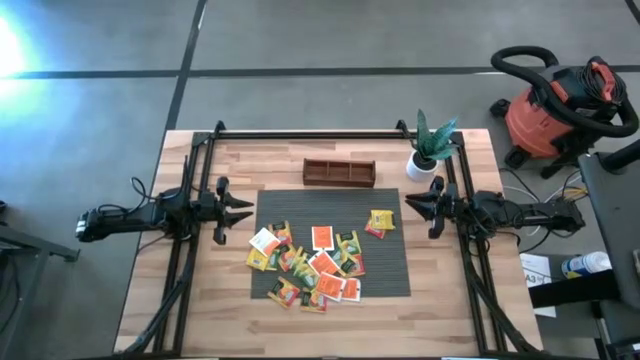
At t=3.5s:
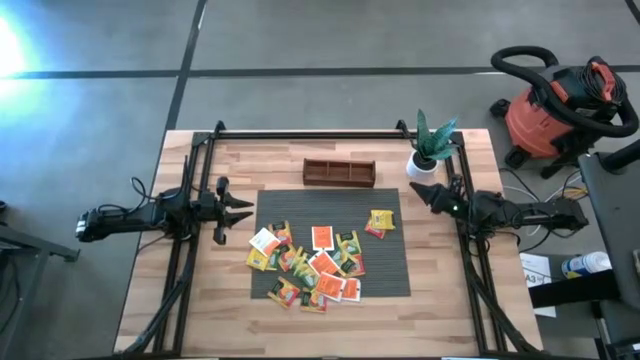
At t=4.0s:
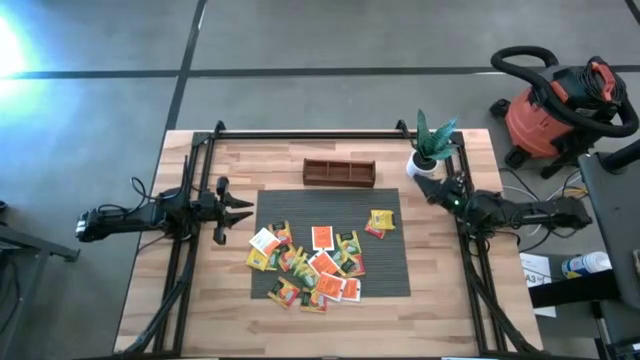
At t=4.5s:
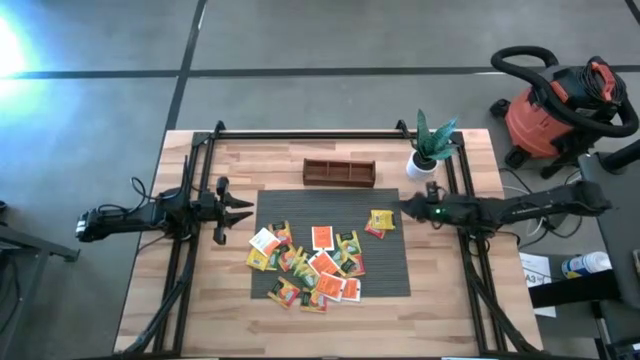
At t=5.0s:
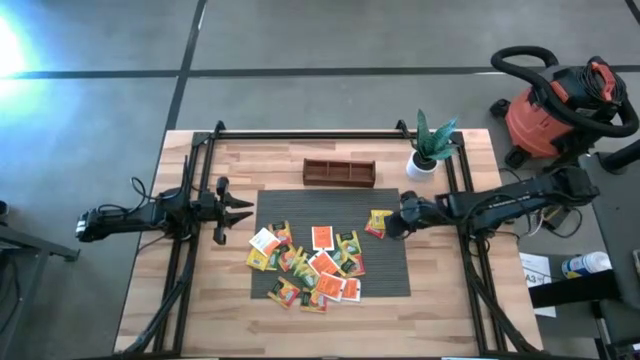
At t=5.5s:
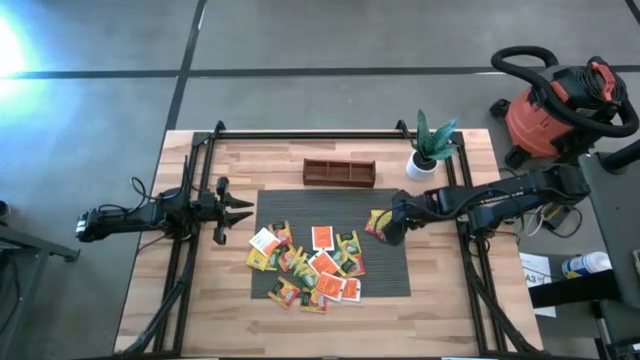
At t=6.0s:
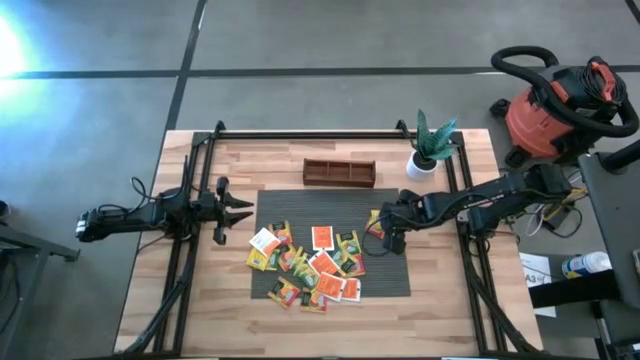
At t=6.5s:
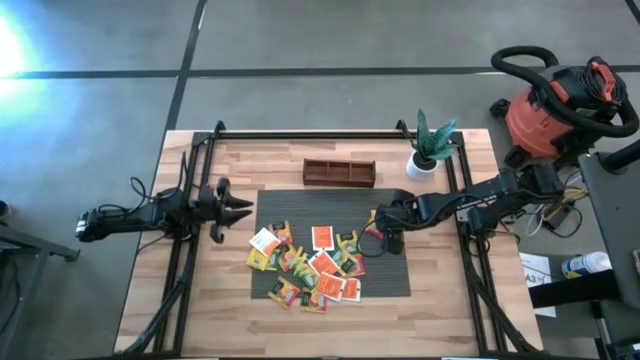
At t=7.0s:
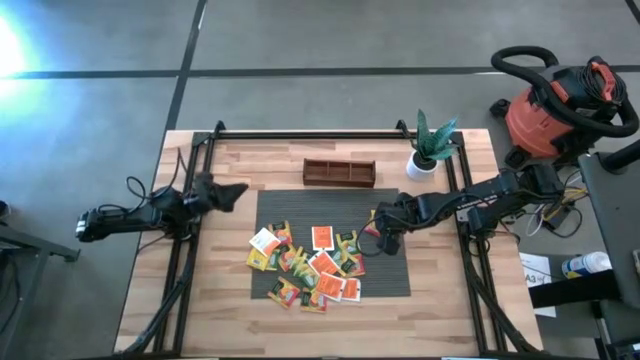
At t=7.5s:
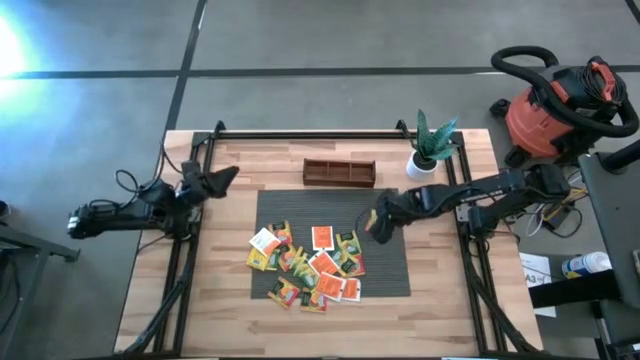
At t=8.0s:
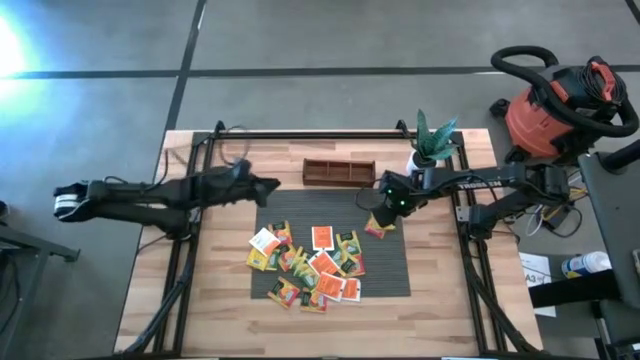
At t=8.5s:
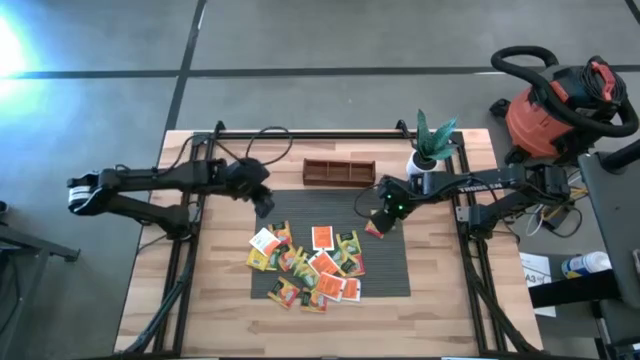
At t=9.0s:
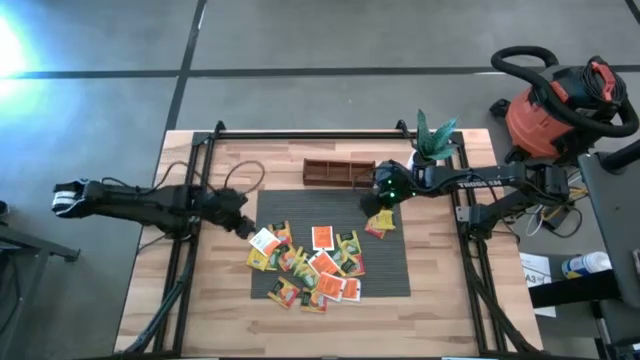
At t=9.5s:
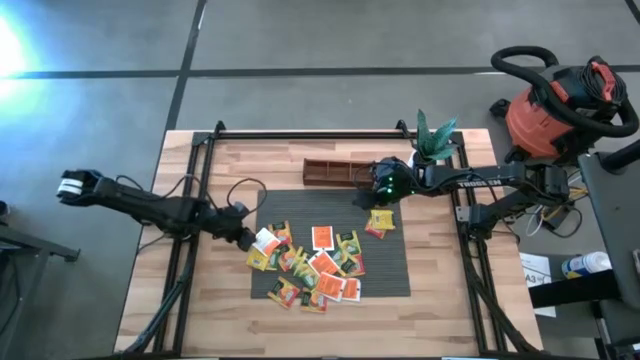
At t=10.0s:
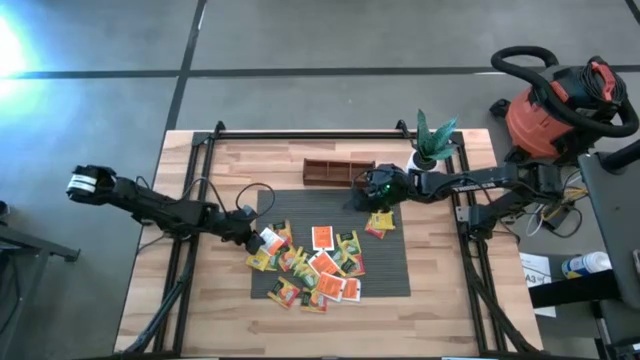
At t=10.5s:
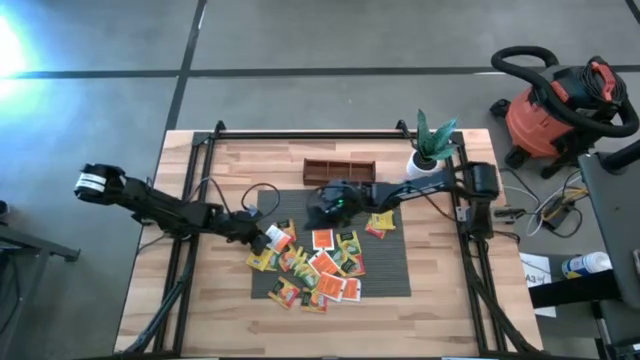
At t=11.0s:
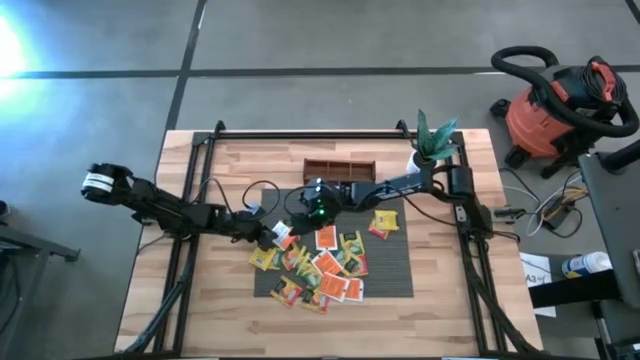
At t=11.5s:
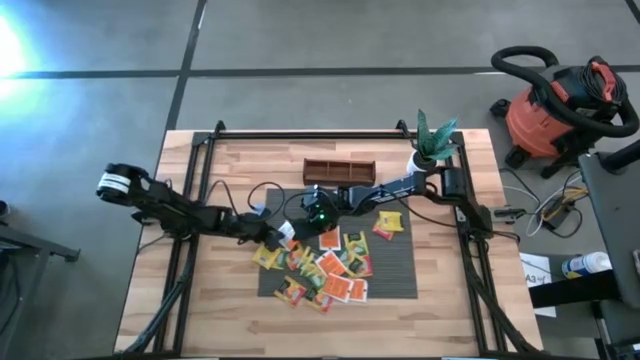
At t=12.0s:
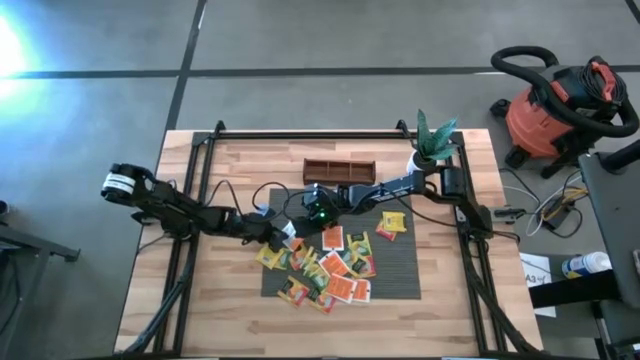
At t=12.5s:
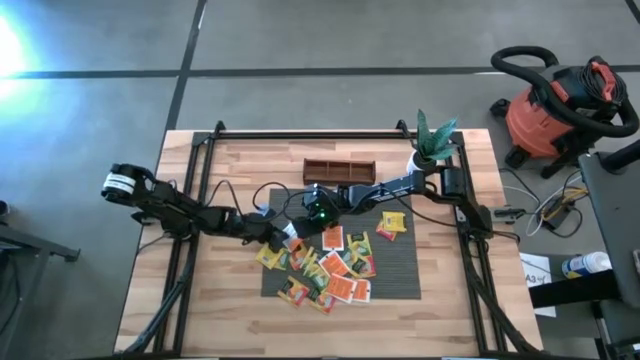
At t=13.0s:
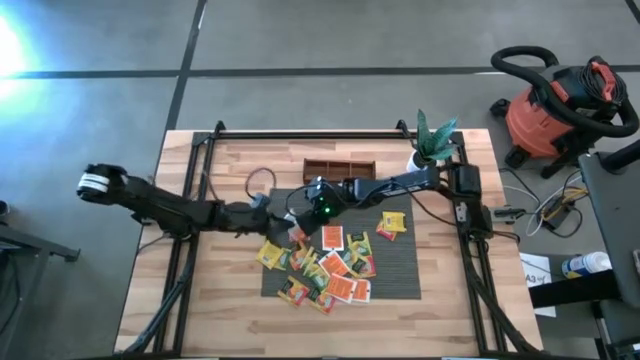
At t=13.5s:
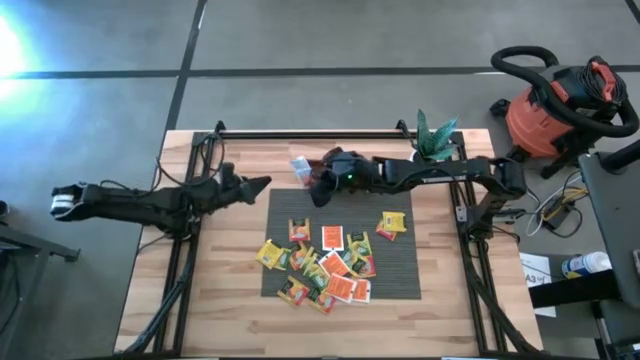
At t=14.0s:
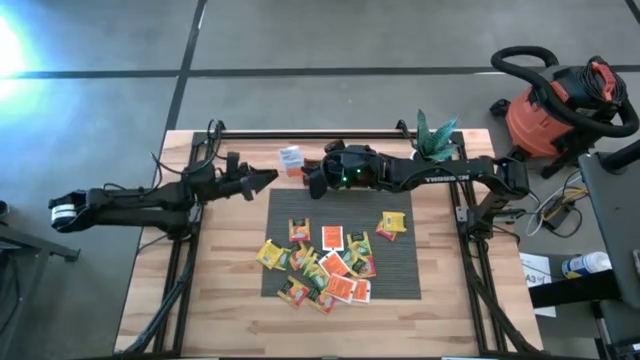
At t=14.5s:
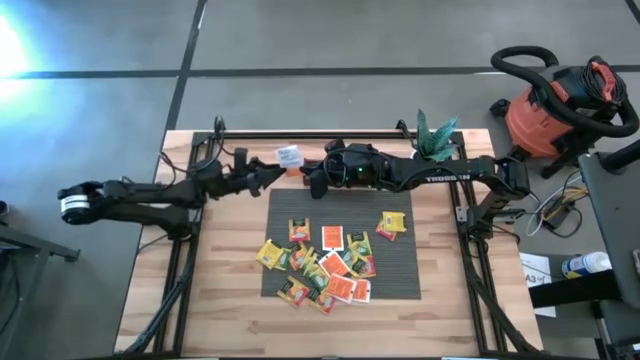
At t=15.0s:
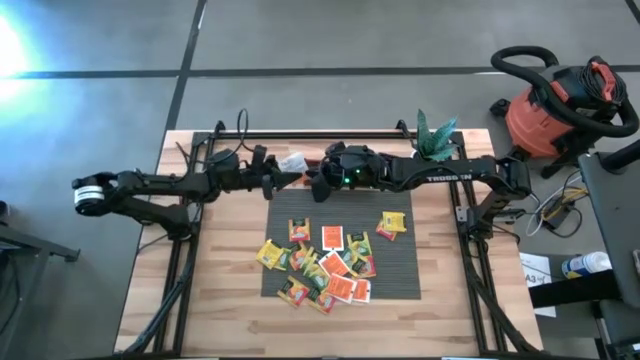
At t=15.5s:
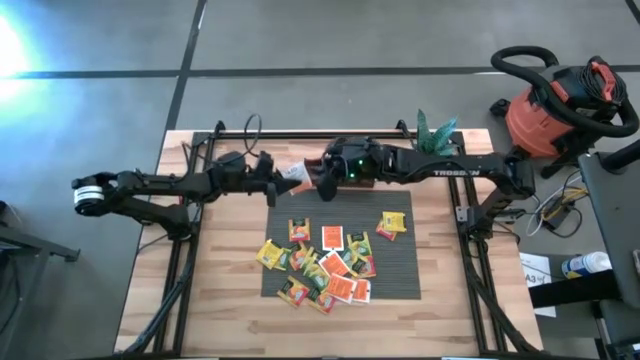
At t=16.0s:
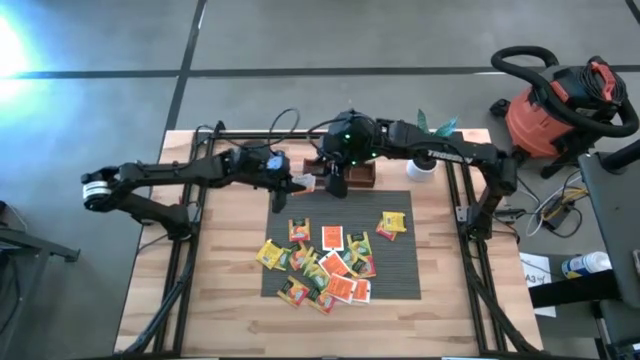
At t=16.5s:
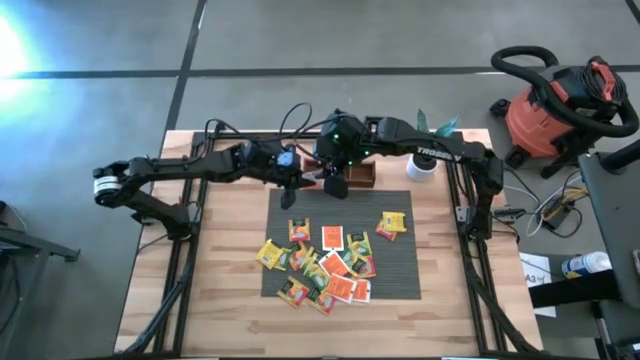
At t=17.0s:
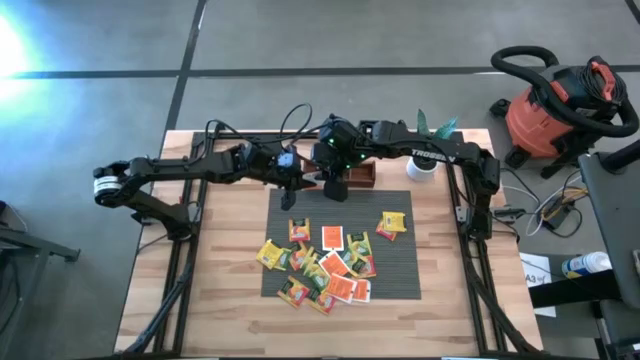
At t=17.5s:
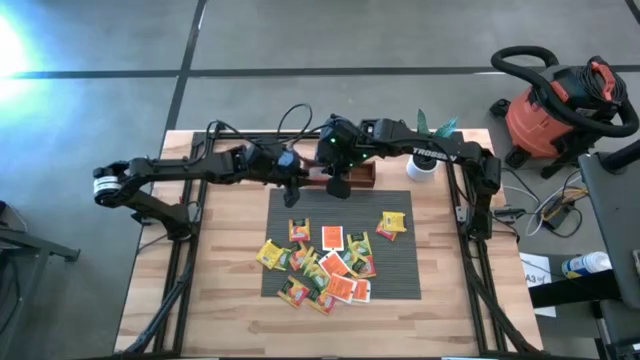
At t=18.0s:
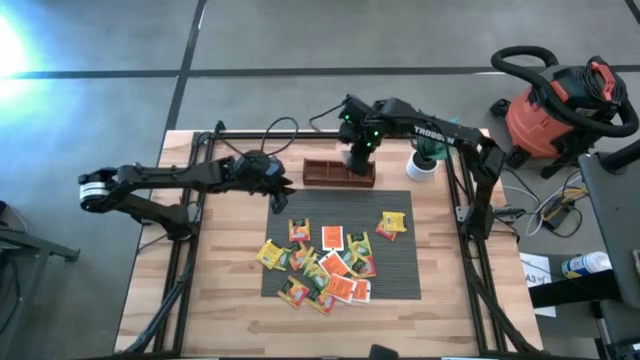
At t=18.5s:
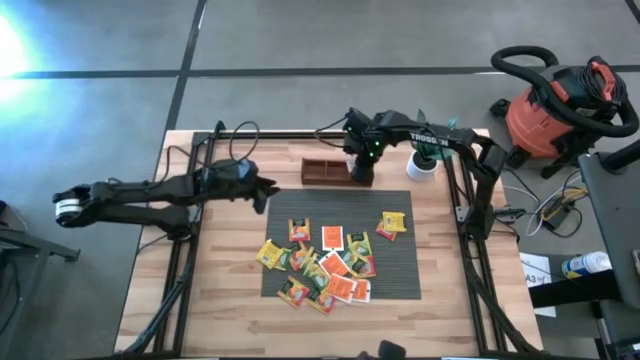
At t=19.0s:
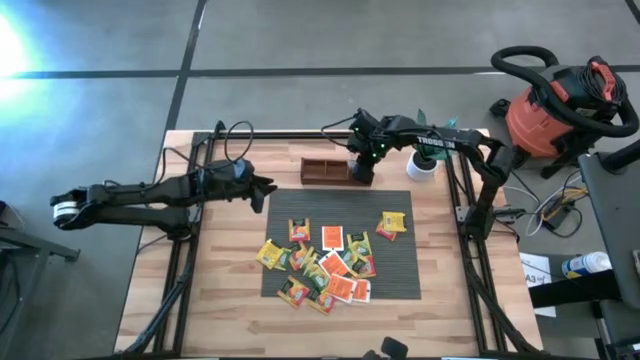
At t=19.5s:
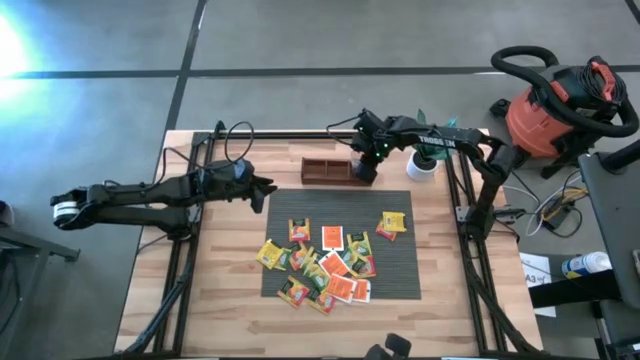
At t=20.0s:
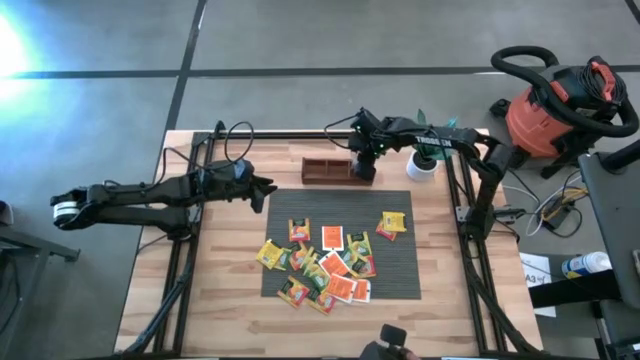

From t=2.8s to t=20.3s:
Task: Pick & Place Tea
Put the white orange tea bag into the right section of the wooden organizer

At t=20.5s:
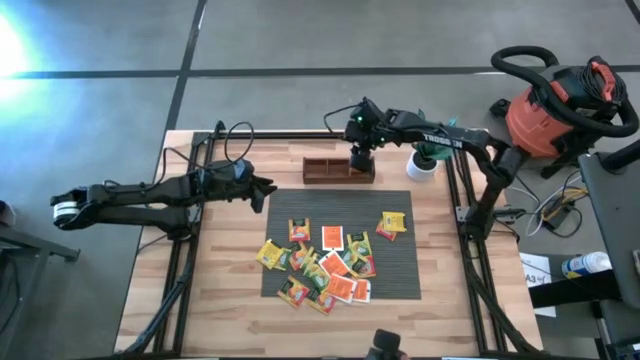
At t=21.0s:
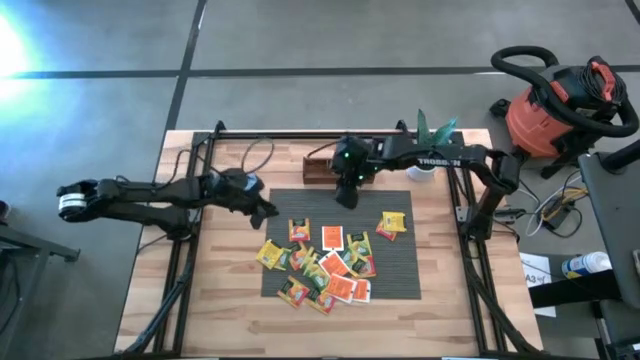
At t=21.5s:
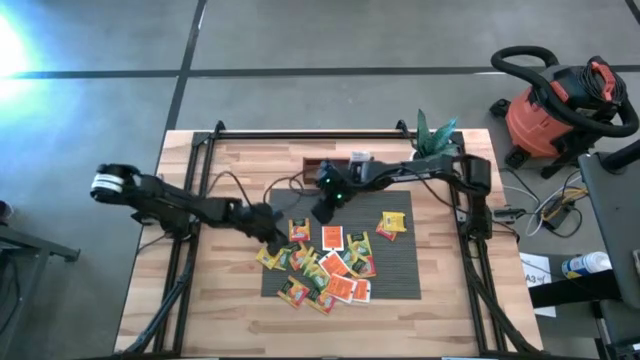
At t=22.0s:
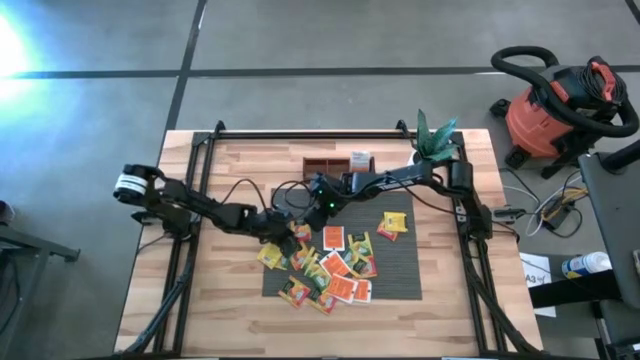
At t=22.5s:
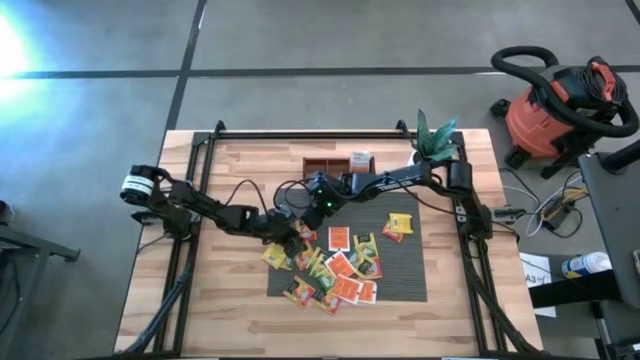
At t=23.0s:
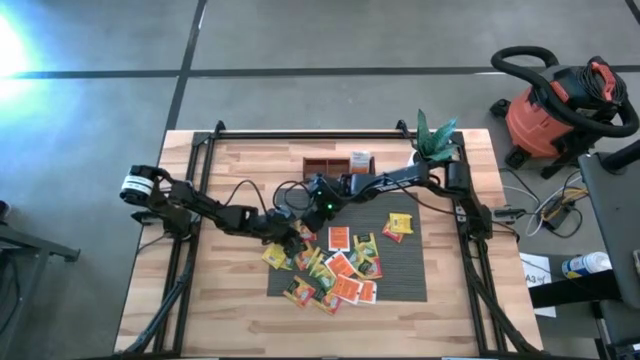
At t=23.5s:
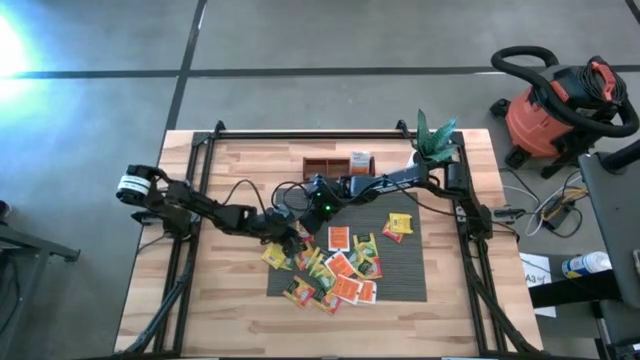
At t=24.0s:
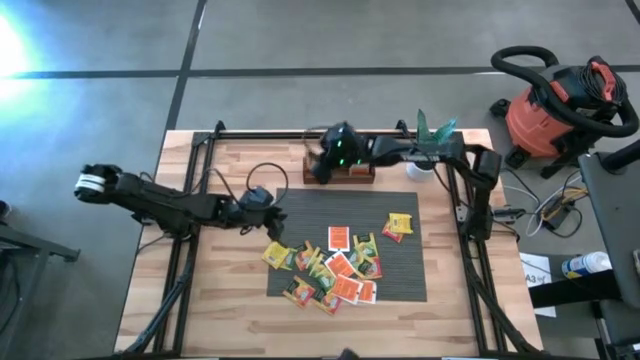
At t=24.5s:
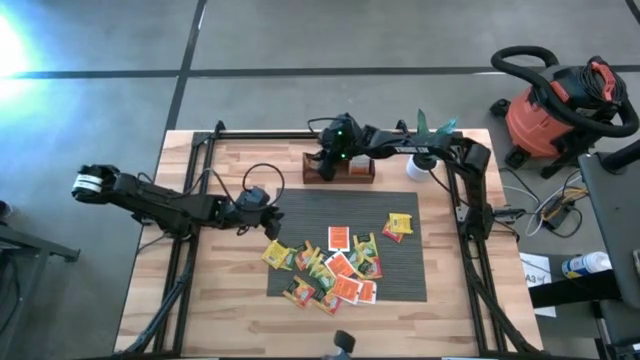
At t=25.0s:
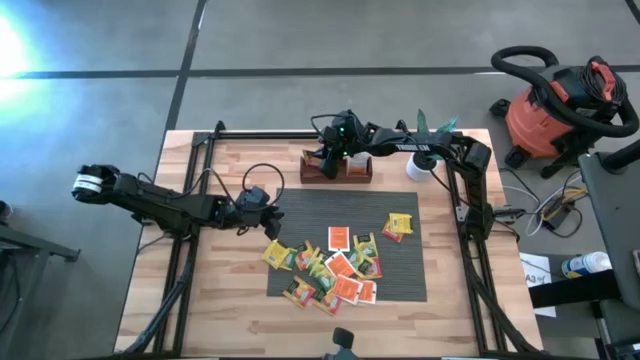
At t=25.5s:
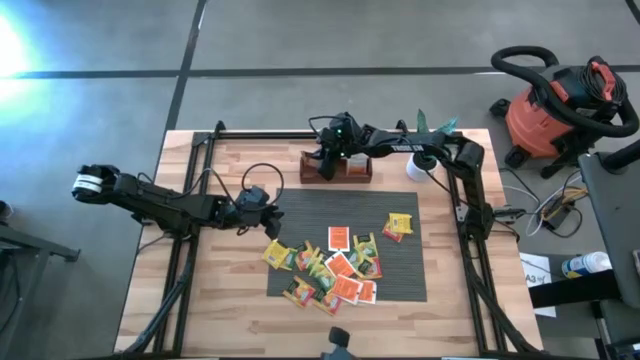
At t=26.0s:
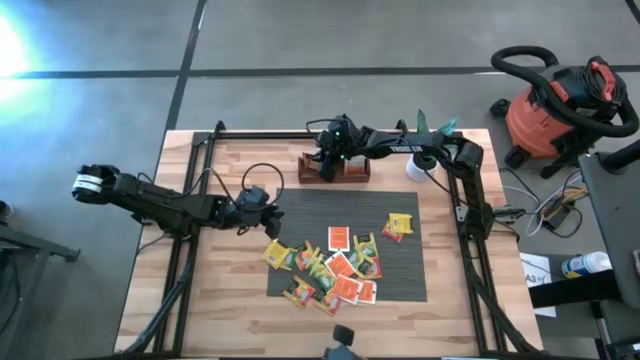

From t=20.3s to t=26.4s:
Put the orange tea bag into the left section of the wooden organizer
